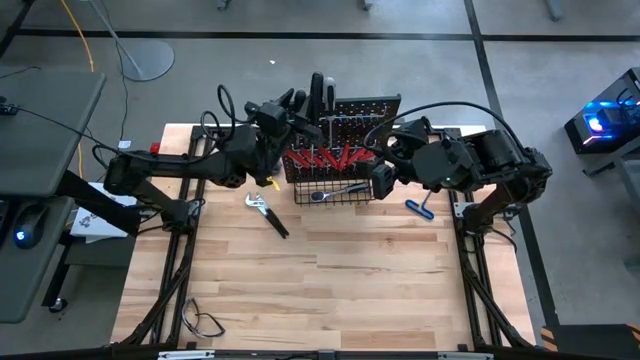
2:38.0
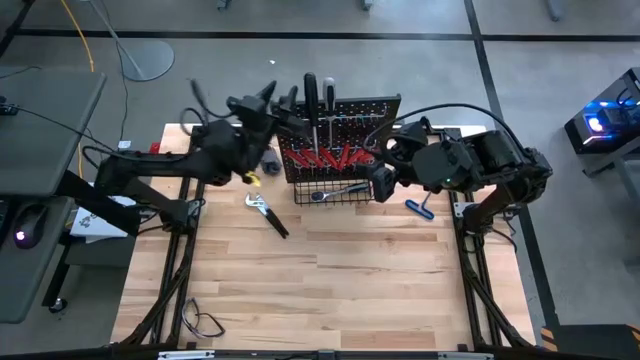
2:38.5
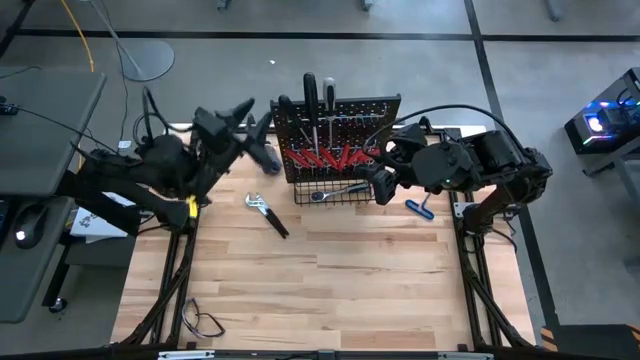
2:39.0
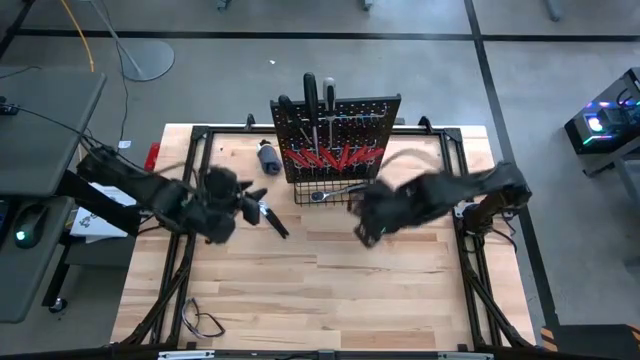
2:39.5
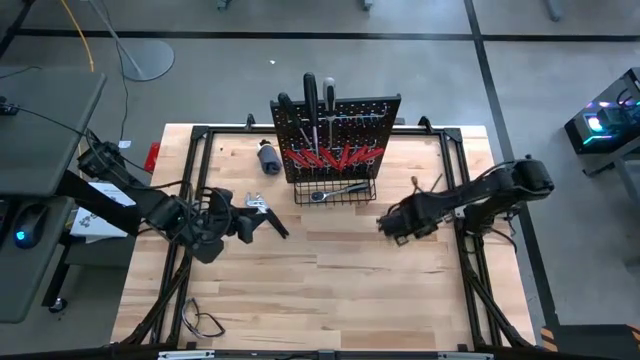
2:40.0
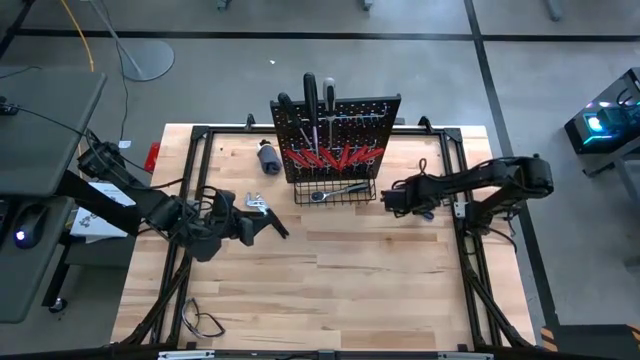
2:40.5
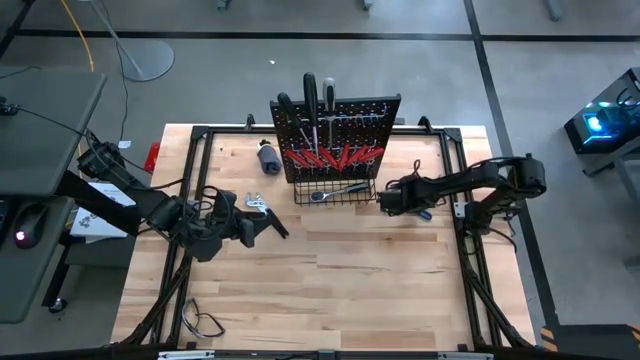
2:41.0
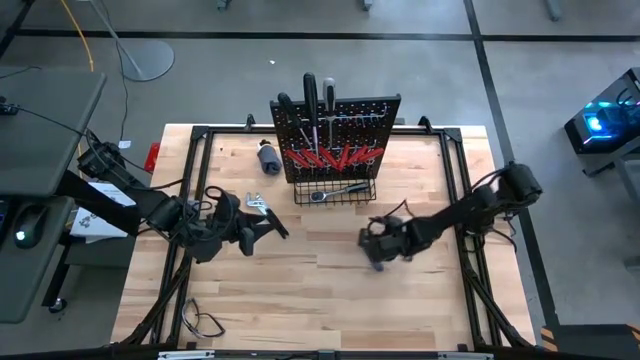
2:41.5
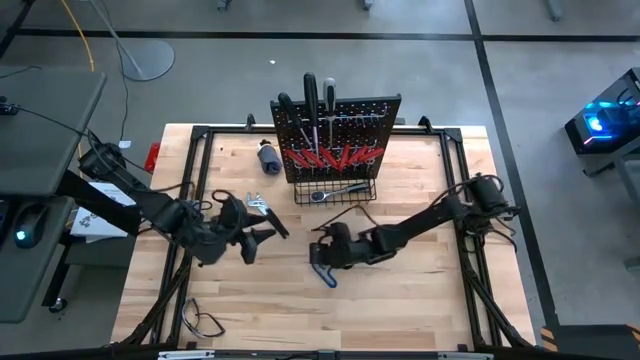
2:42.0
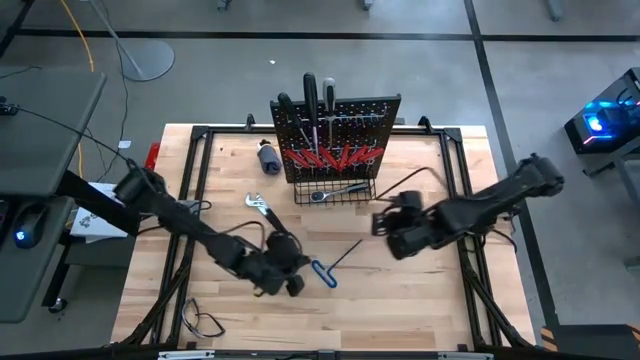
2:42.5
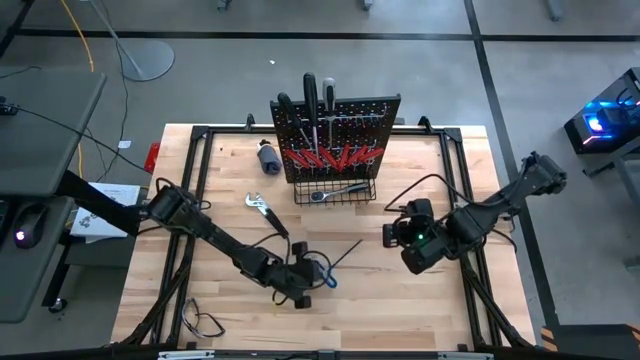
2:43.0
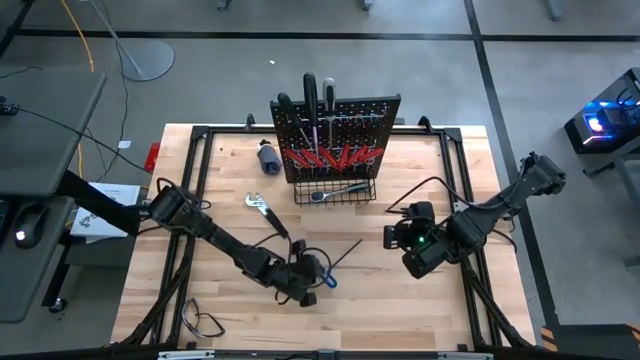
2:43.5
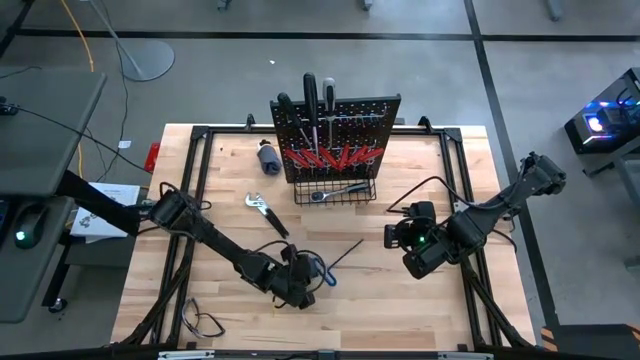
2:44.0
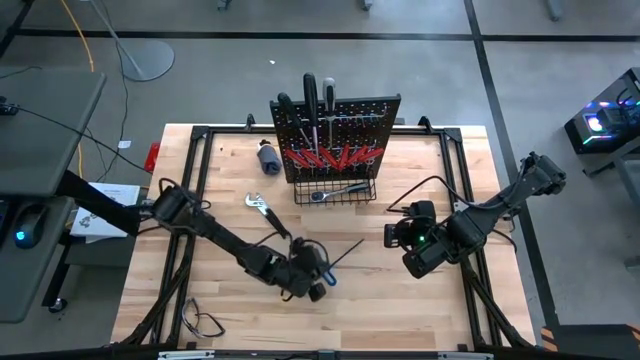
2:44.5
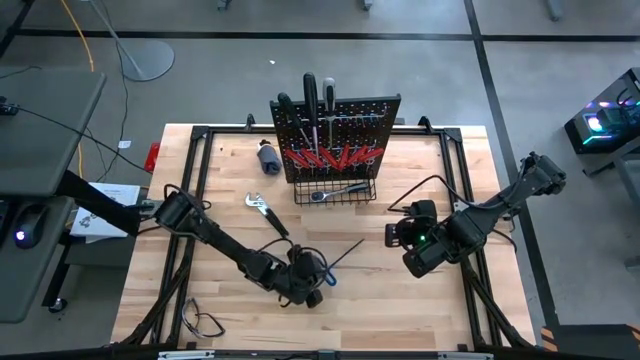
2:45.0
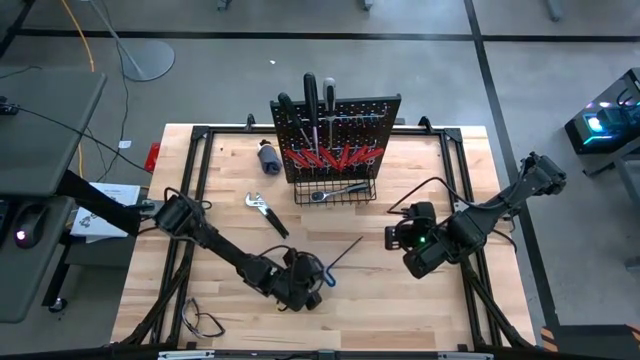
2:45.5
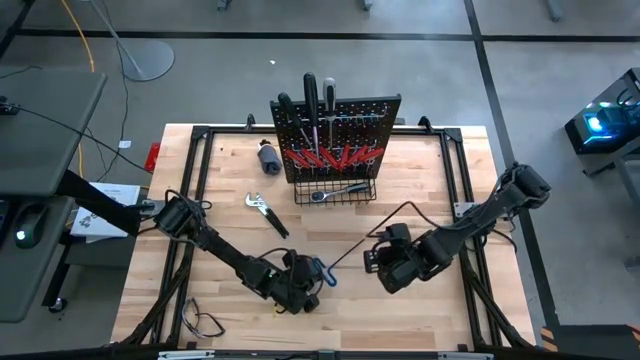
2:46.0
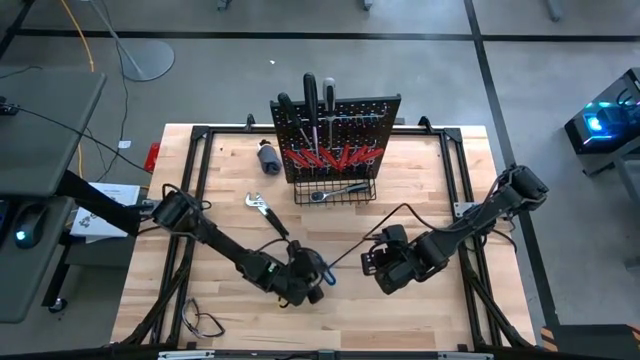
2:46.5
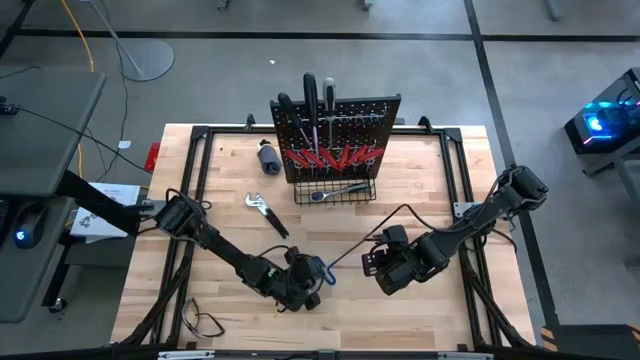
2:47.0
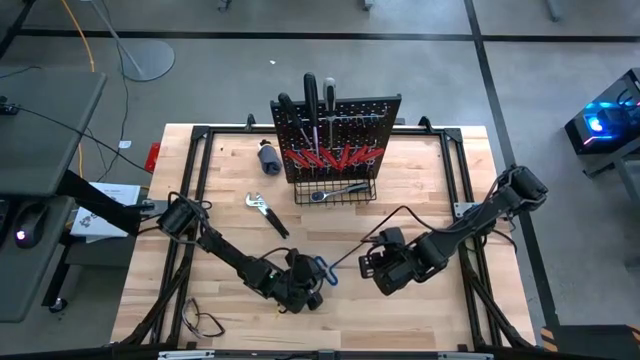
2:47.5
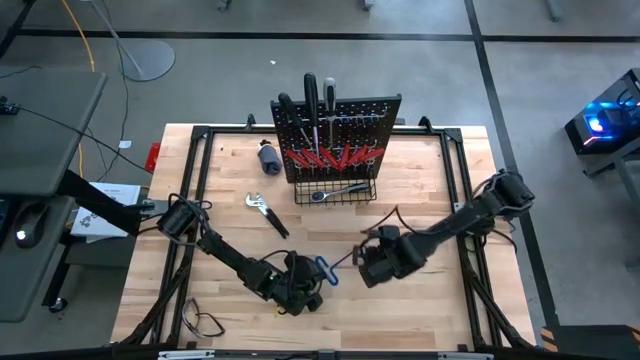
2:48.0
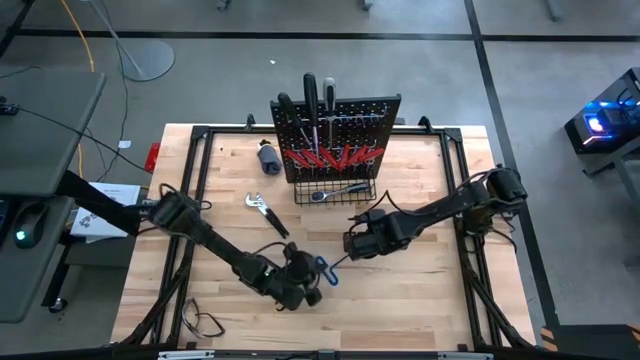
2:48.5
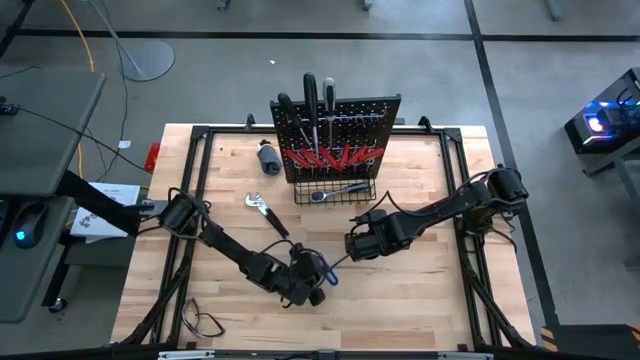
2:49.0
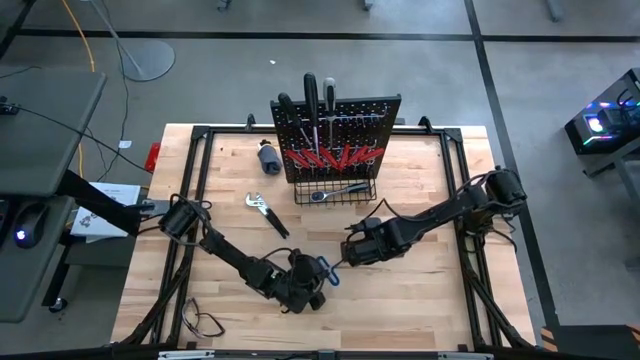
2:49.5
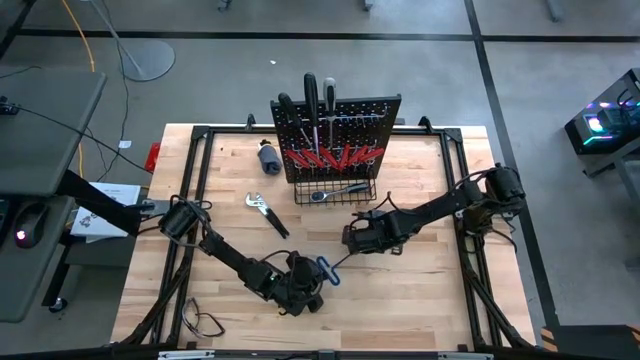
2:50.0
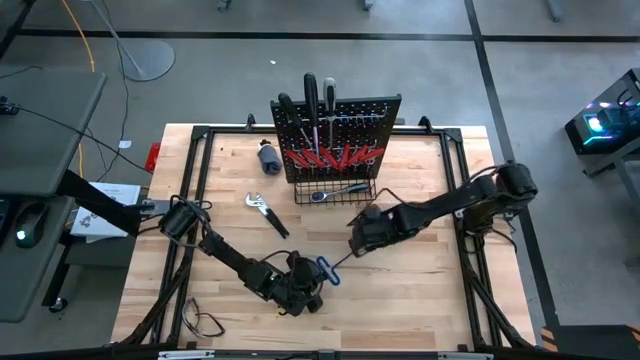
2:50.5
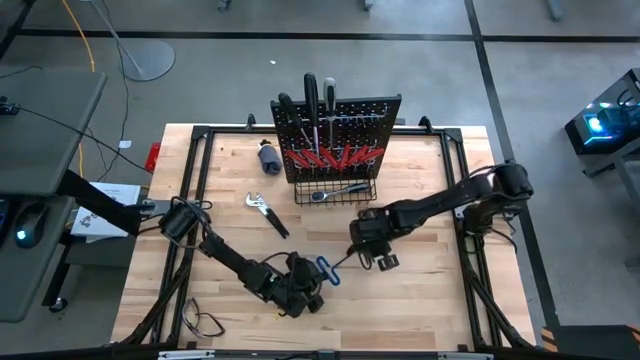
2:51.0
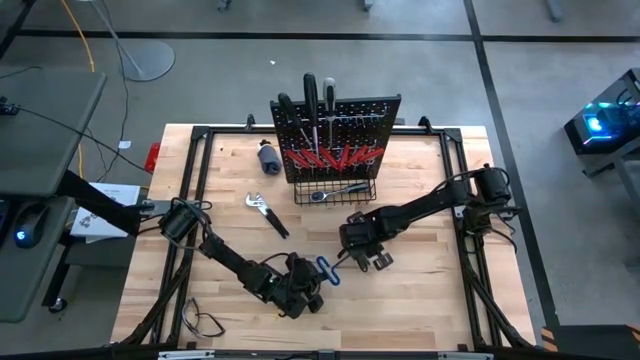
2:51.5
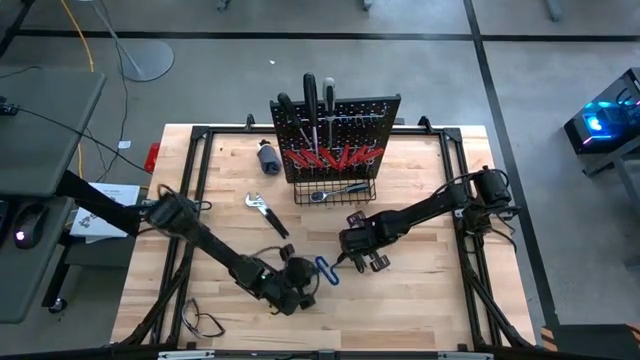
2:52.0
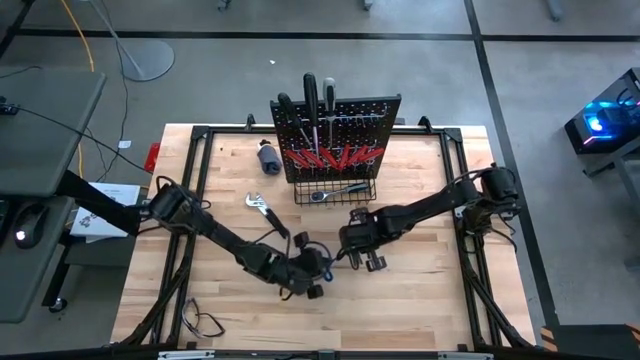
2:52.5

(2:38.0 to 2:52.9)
Task: Hang tools onto peg board
Hang the blue pick tool on the peg board

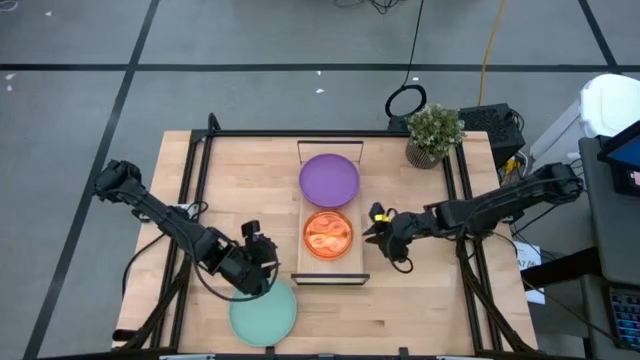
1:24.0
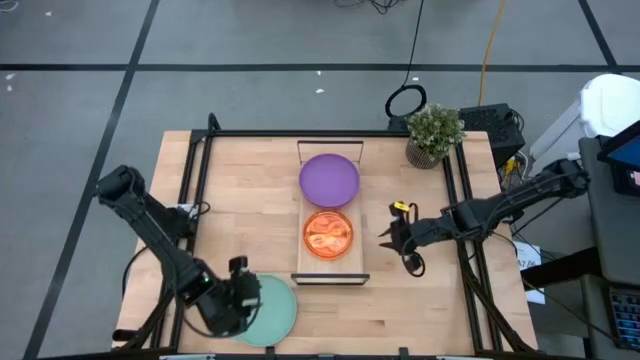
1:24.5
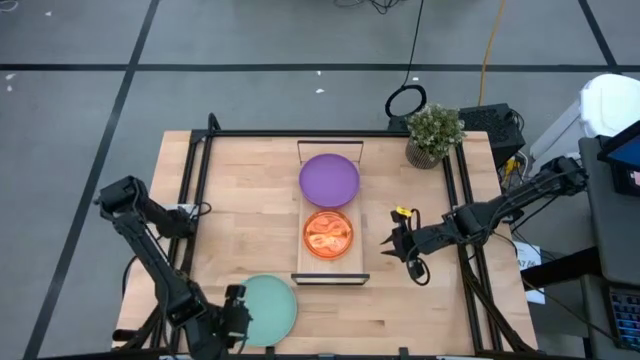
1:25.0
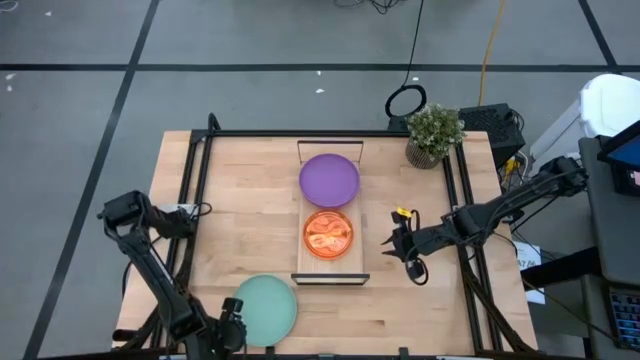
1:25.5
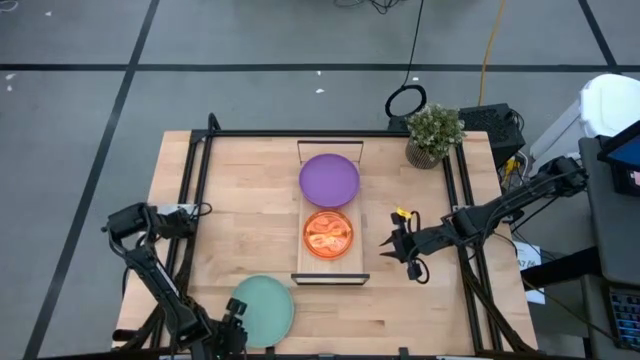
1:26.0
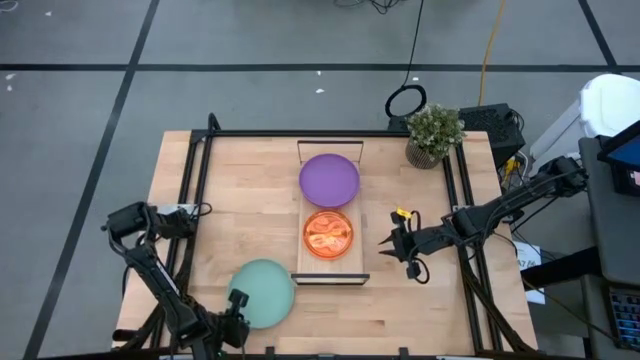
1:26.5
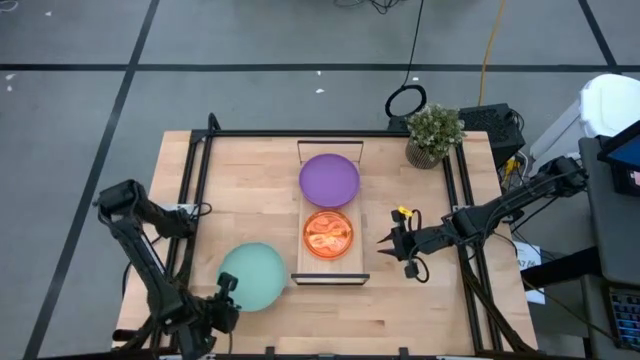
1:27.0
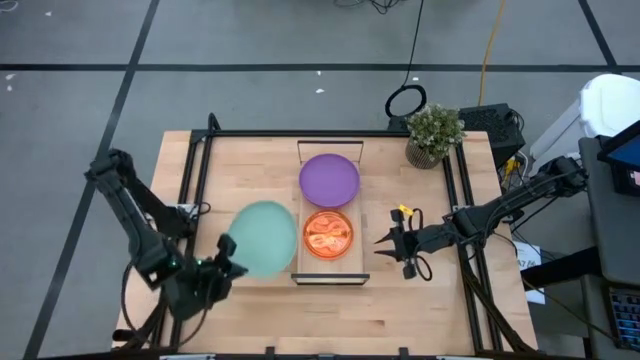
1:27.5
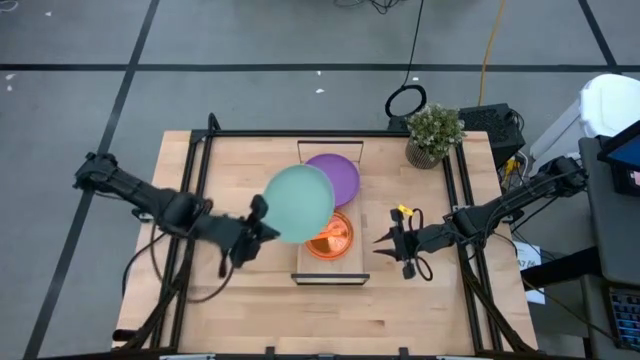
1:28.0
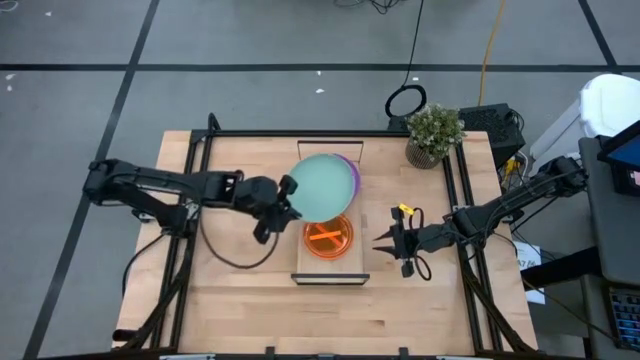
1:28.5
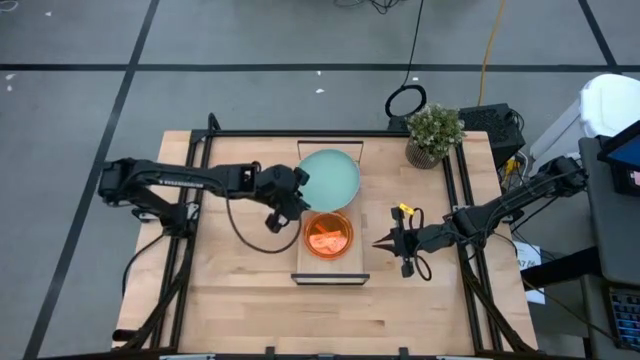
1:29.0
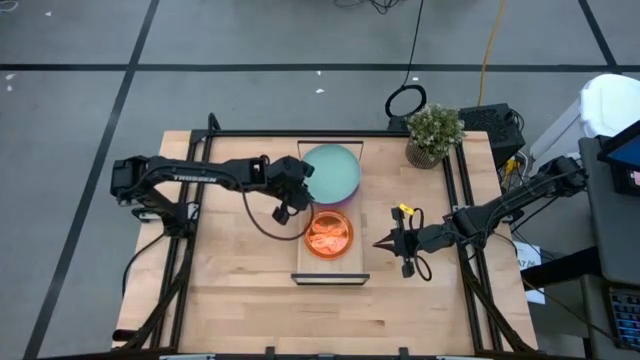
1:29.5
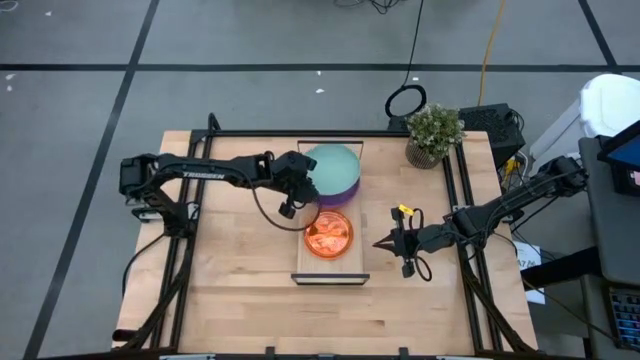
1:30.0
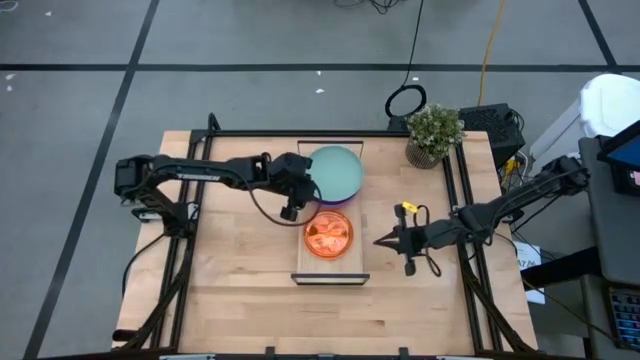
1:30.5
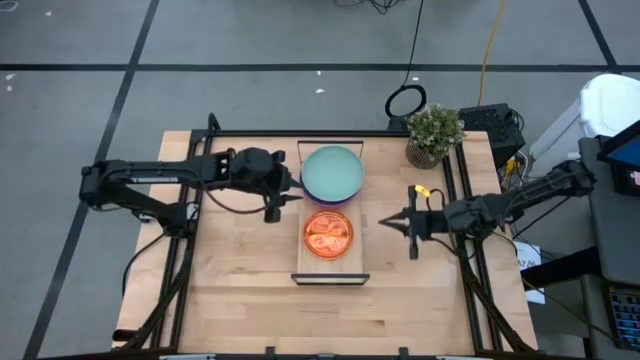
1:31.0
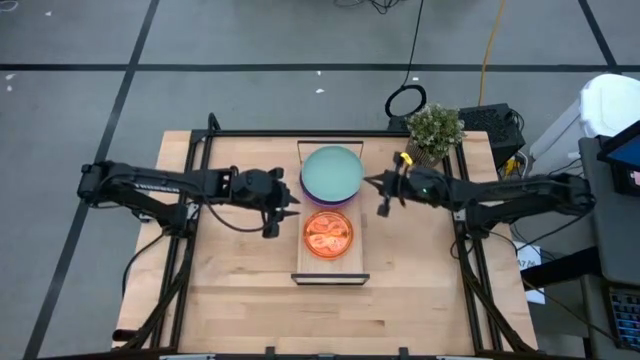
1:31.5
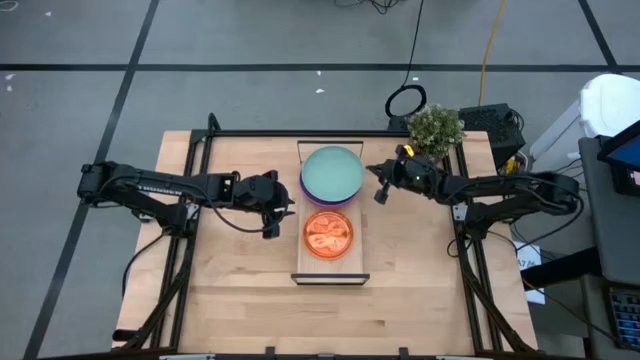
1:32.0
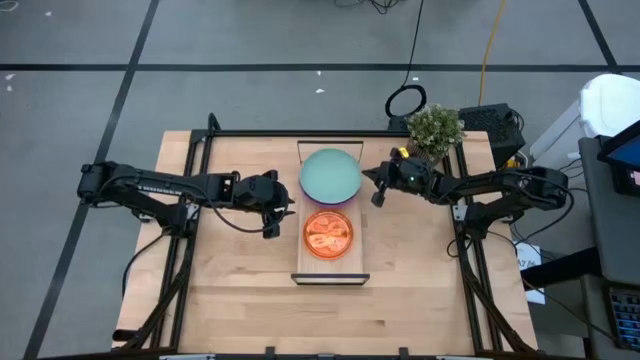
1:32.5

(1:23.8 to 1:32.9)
Task: Place and stack plates onto a shelf
Stack the light green plate on top of the purple plate on the shelf
